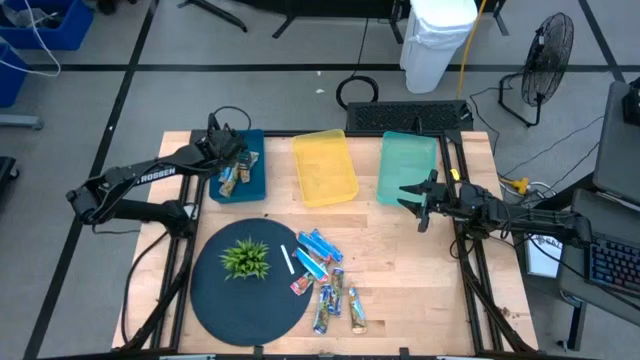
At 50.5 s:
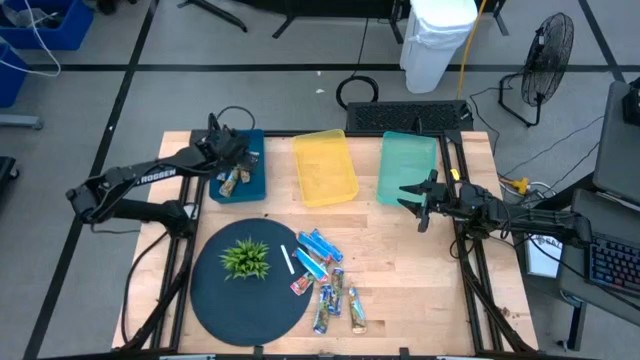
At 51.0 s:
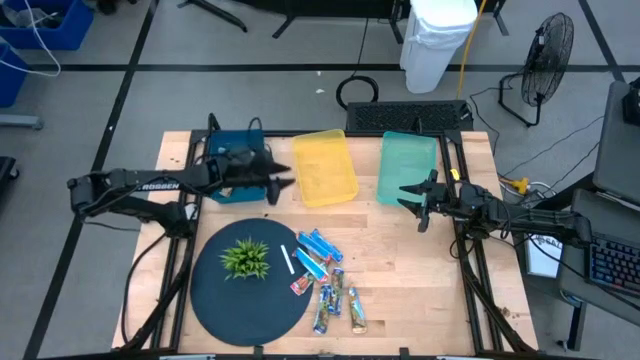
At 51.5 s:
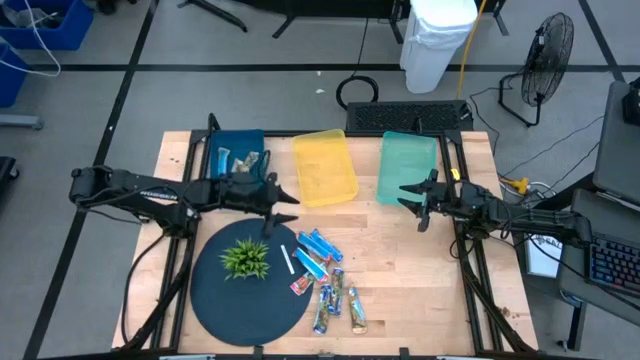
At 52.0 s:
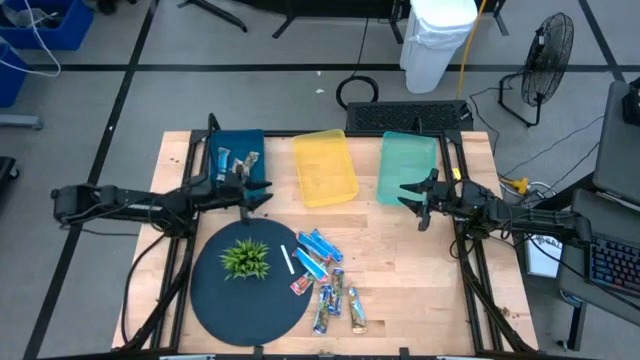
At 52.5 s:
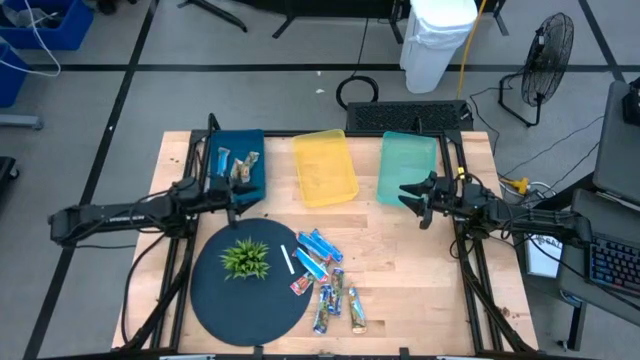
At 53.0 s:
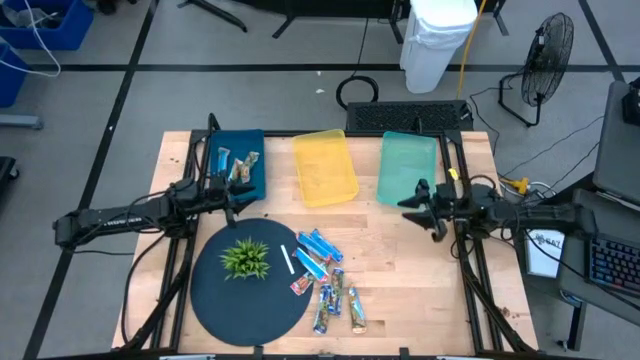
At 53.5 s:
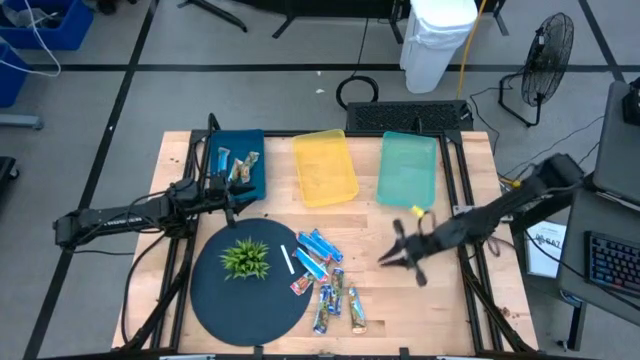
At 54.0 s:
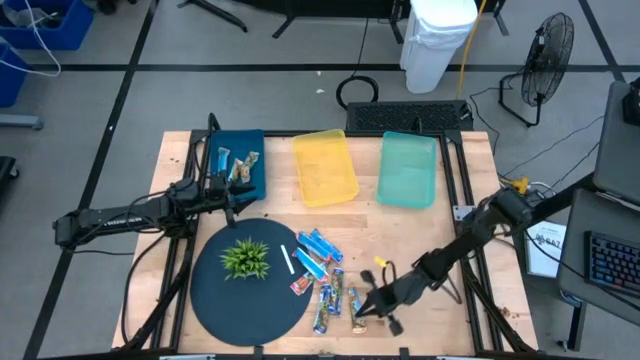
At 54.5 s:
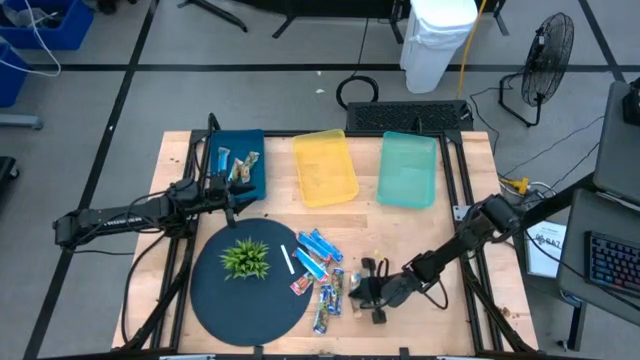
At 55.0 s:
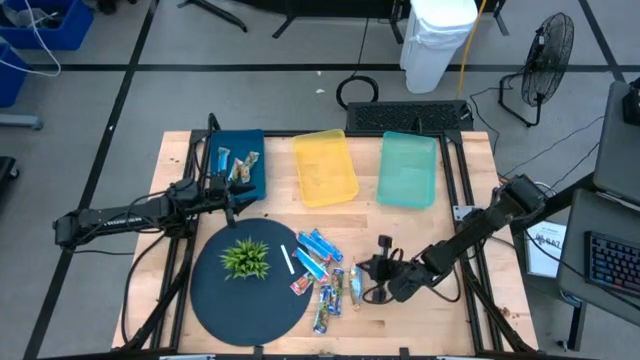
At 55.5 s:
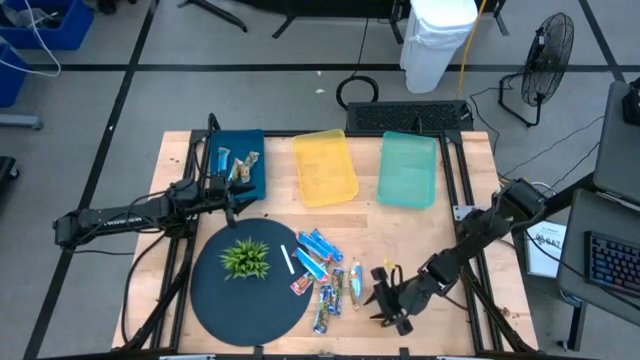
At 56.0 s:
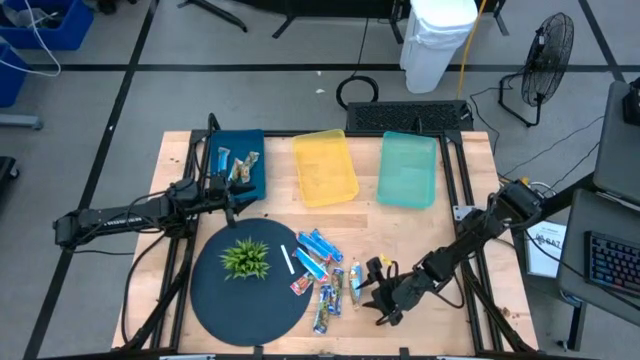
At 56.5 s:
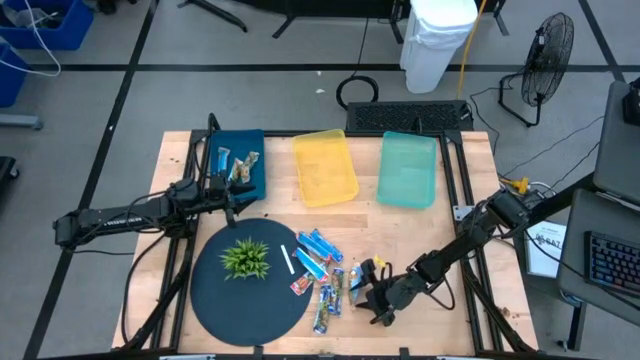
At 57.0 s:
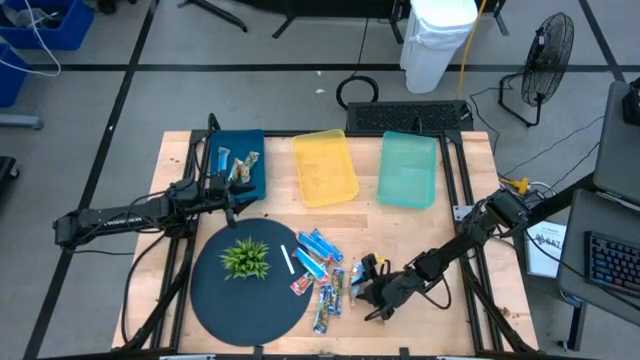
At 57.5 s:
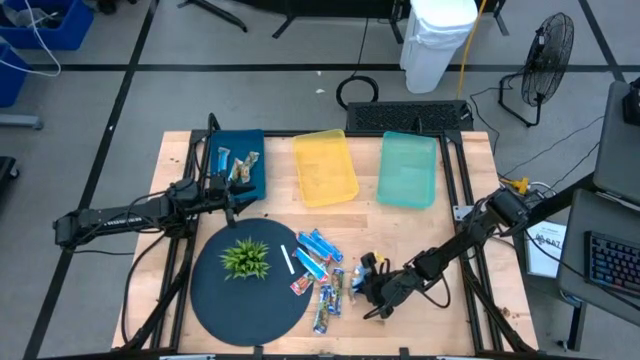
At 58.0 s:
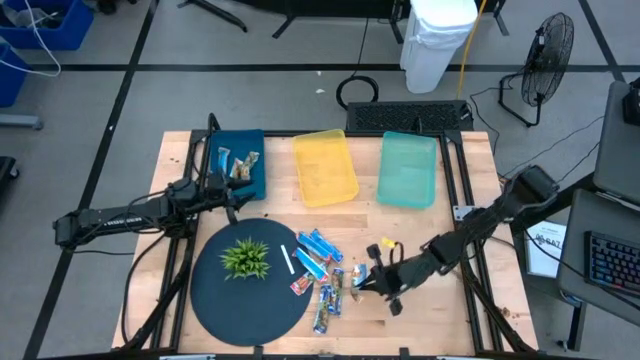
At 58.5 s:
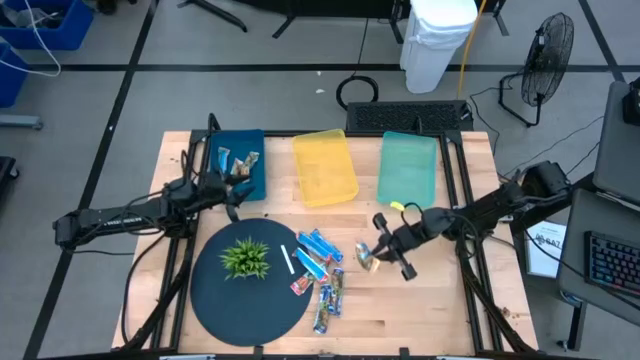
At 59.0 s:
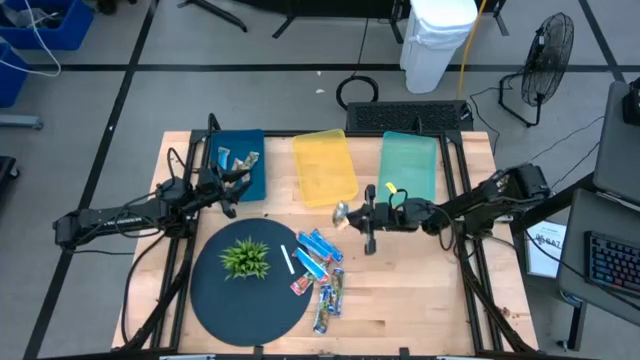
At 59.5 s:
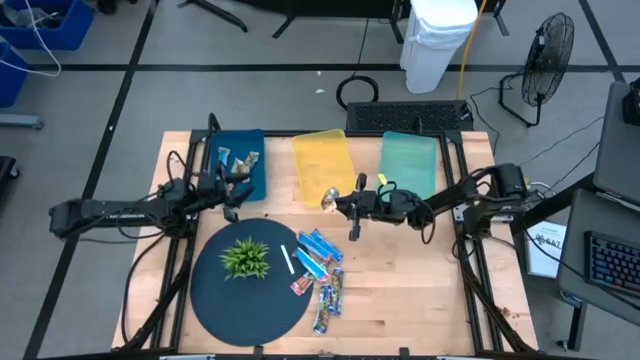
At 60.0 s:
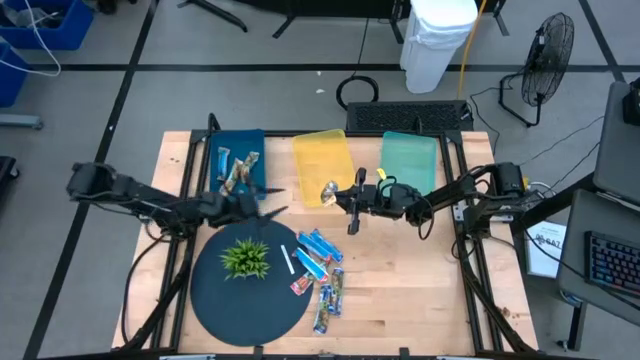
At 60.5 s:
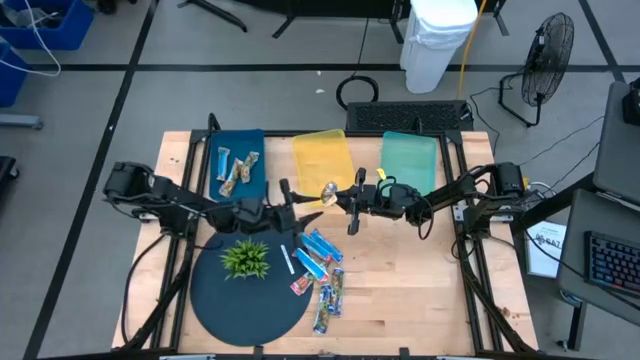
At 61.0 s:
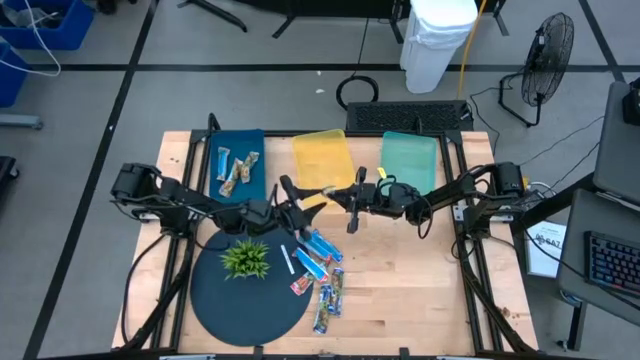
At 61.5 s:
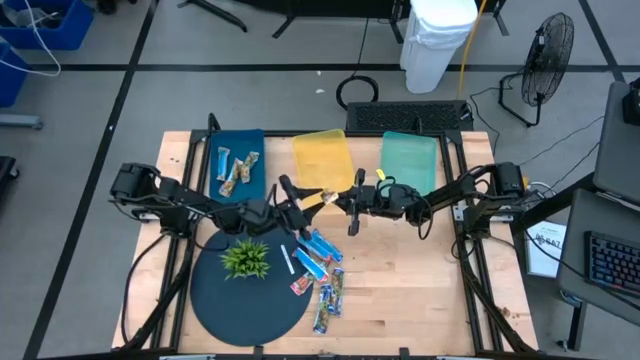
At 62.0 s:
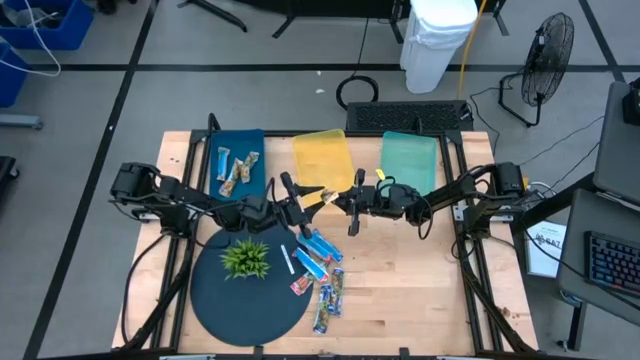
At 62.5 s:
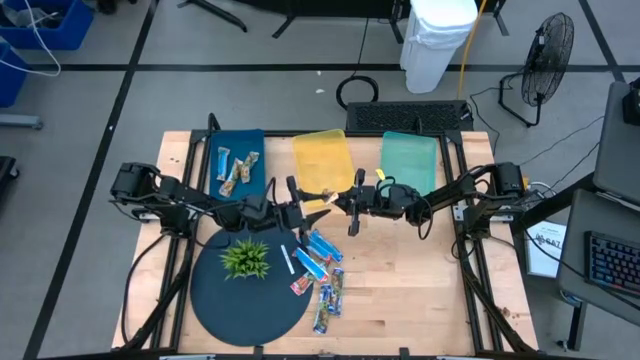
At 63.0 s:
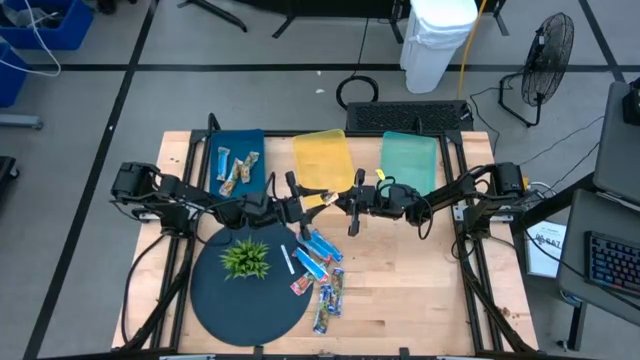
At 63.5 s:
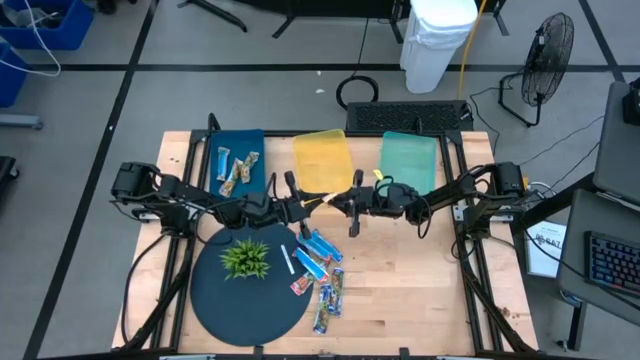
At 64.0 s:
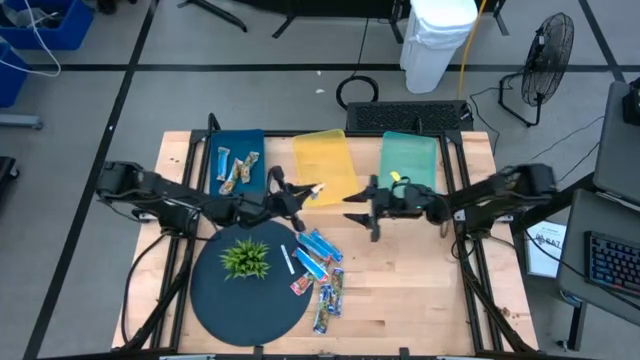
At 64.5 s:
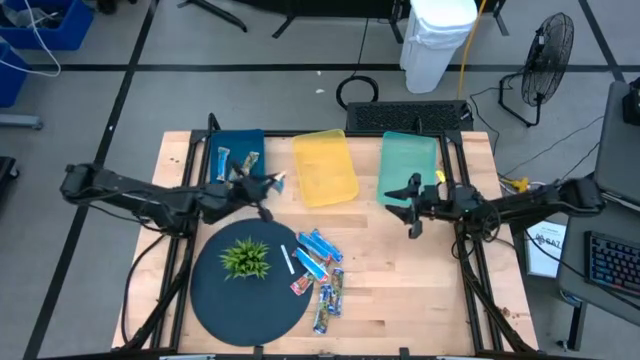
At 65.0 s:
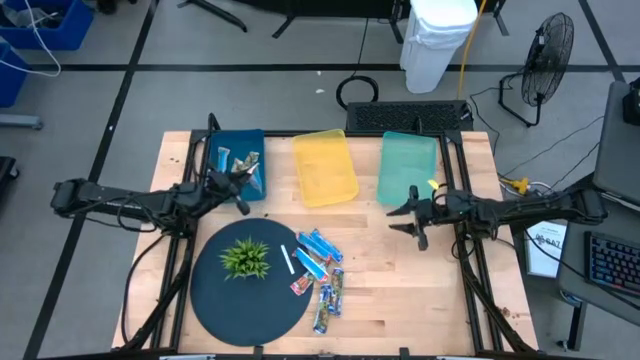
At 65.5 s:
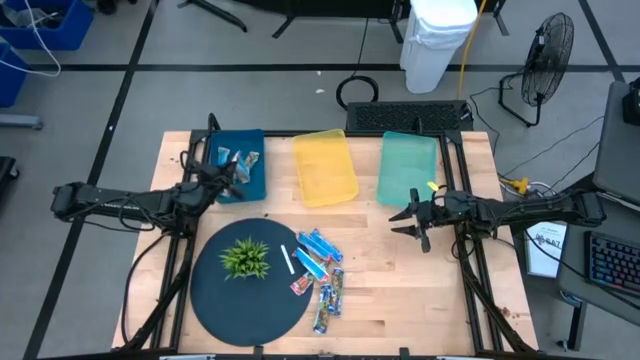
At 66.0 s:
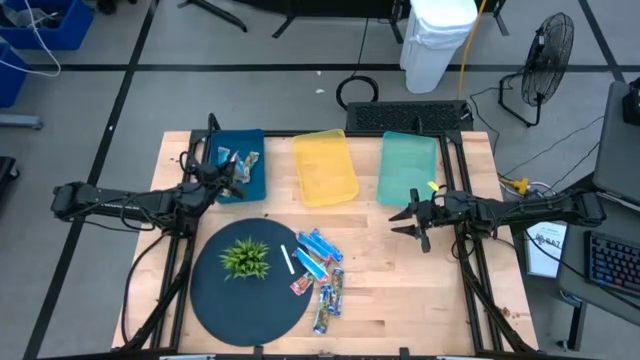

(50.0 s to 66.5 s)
Task: Pick and place Granola Bars by type
Put the yellow granola bar into the blue bin

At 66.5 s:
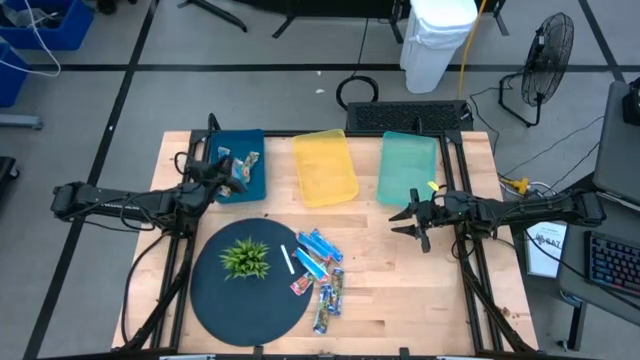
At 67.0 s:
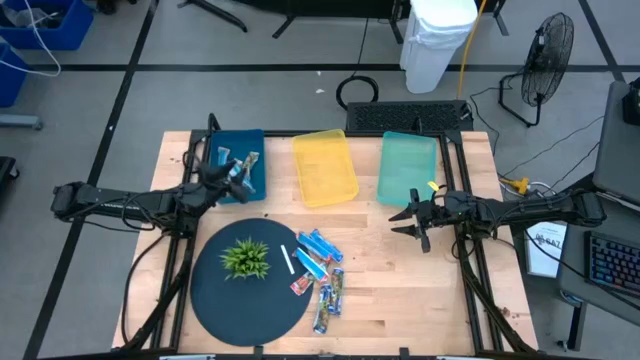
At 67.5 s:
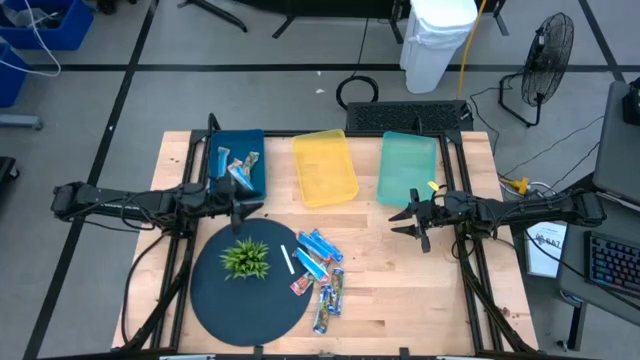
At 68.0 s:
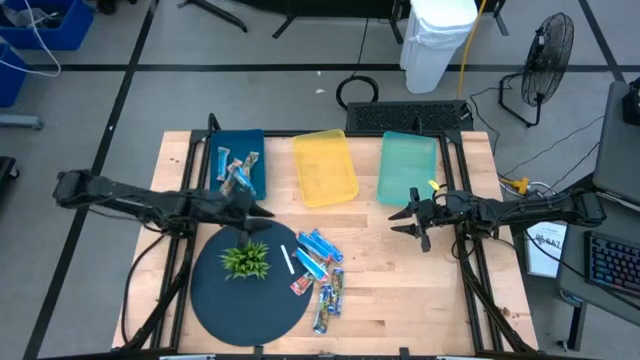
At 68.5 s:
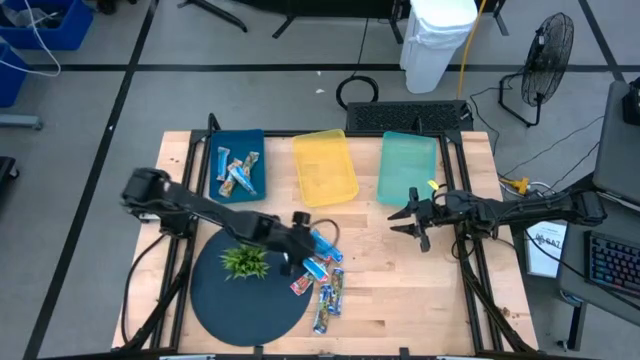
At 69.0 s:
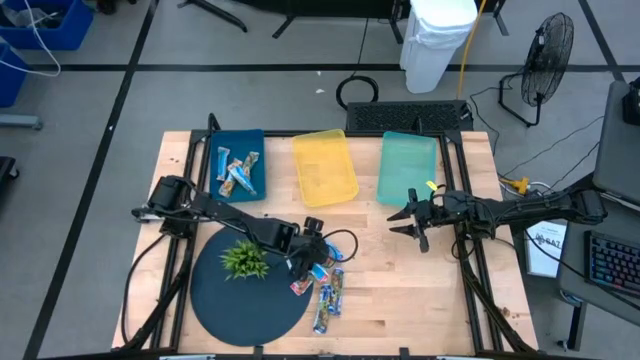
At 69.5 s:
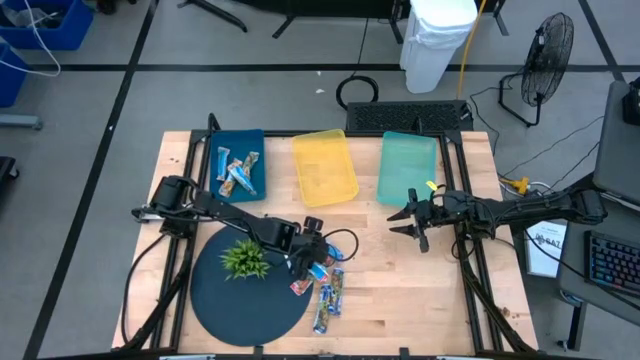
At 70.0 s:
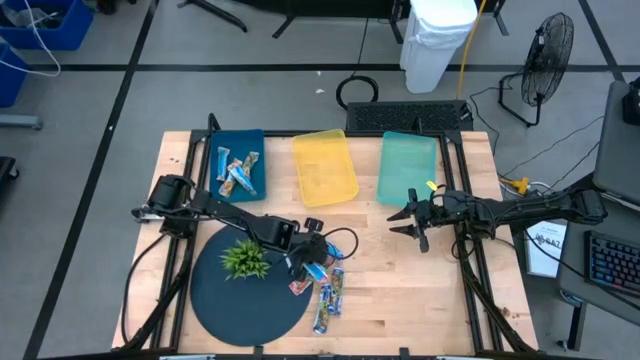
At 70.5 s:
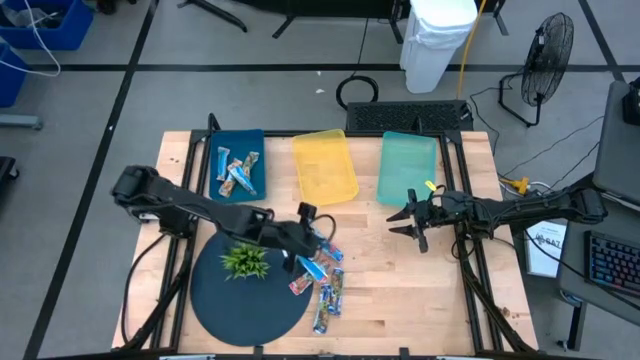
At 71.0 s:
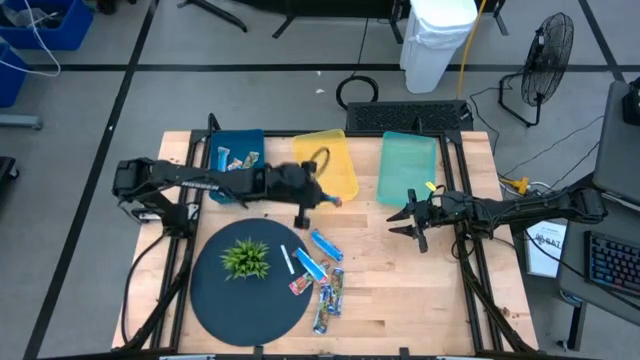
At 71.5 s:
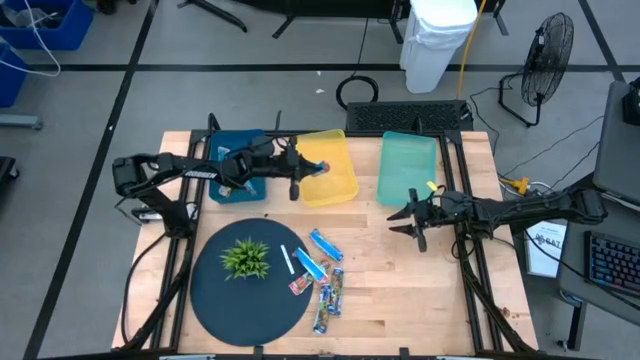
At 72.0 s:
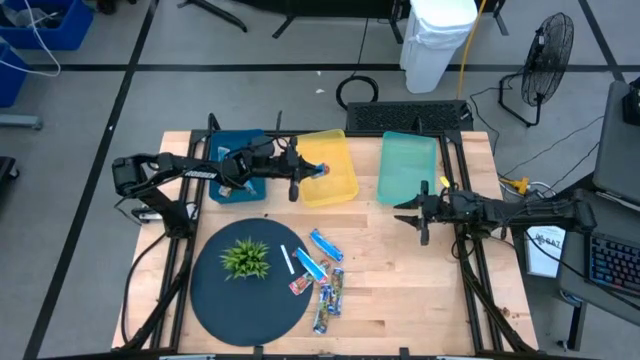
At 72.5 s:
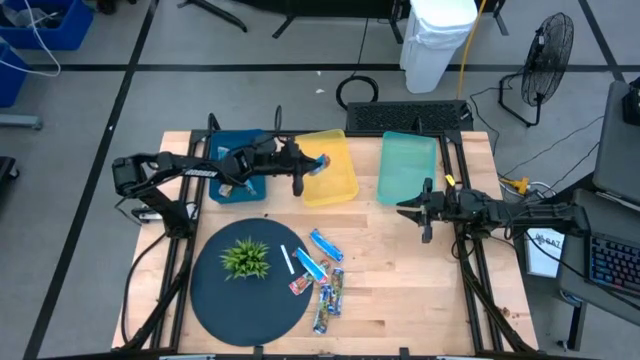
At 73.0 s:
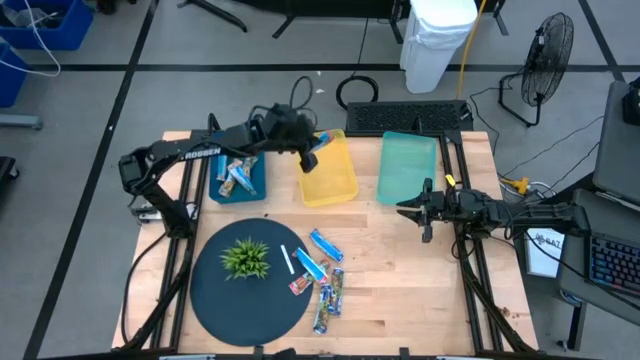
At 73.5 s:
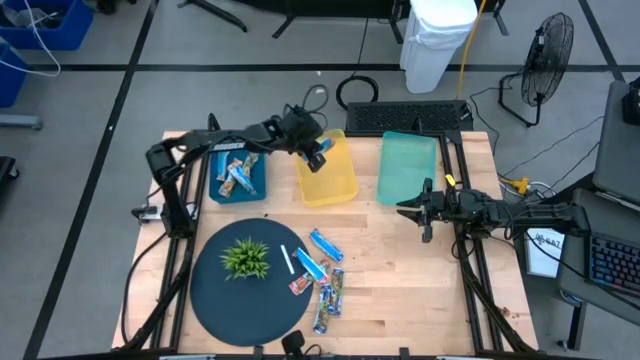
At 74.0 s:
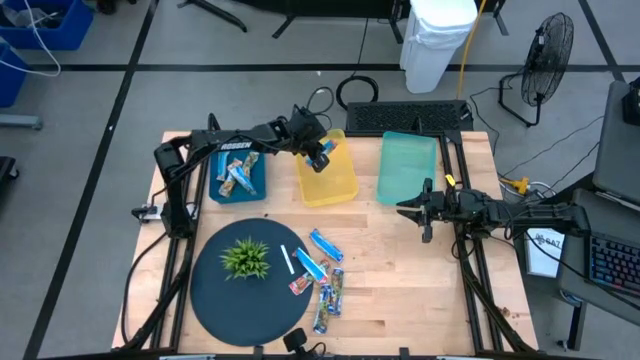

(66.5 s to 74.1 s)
Put the red granola bar into the yellow bin
